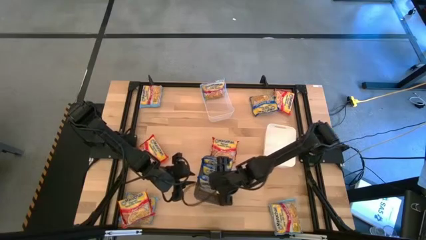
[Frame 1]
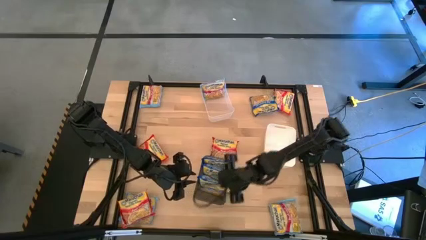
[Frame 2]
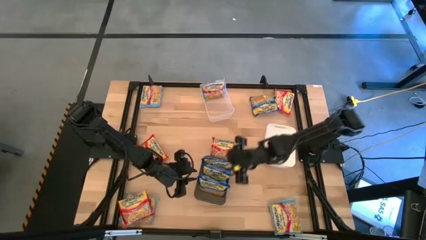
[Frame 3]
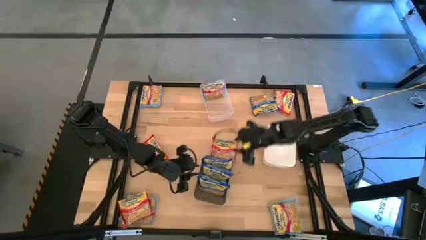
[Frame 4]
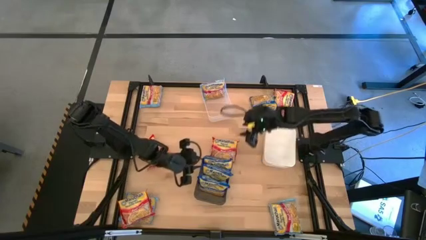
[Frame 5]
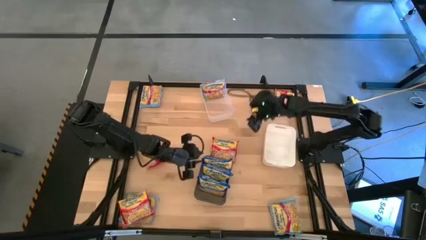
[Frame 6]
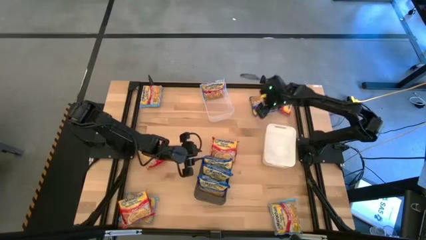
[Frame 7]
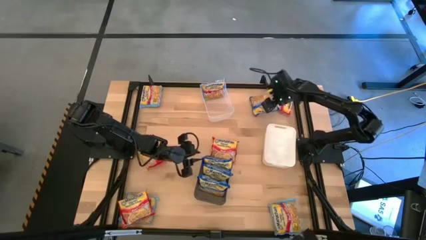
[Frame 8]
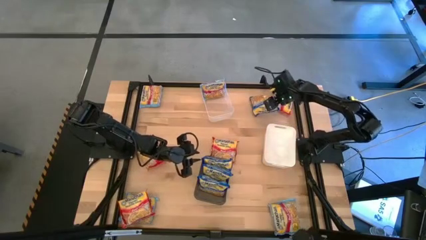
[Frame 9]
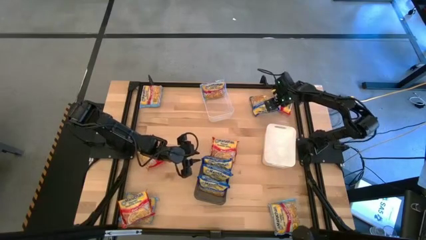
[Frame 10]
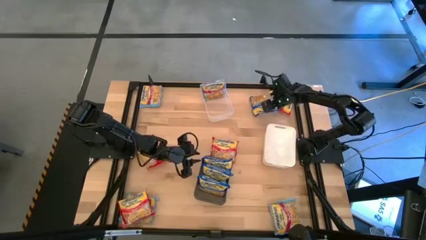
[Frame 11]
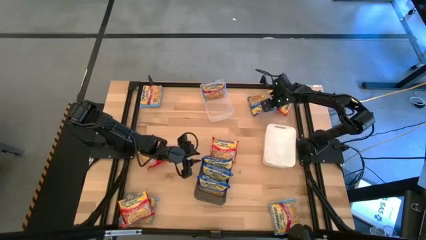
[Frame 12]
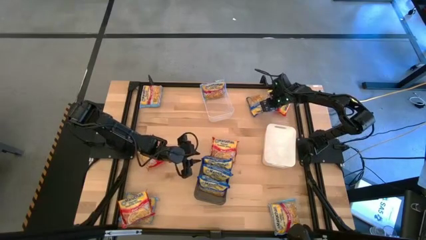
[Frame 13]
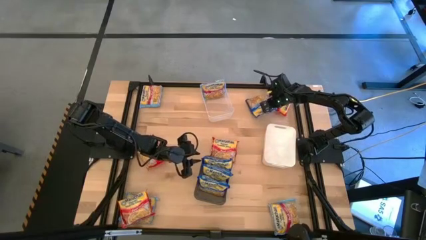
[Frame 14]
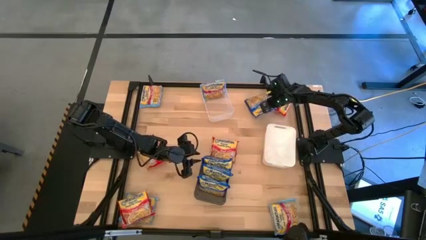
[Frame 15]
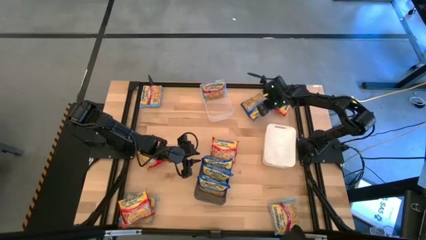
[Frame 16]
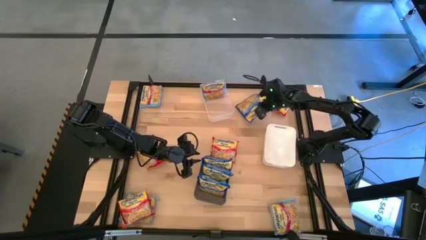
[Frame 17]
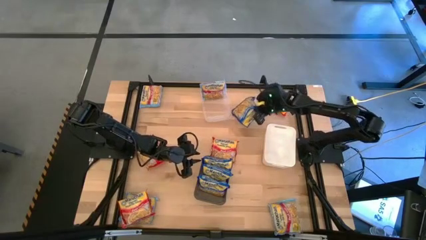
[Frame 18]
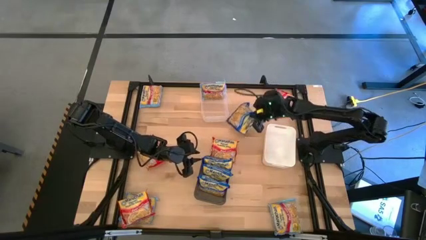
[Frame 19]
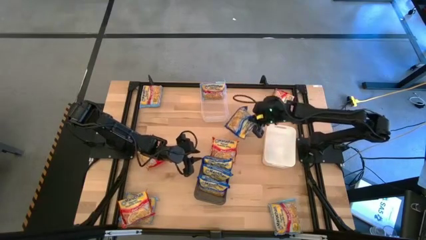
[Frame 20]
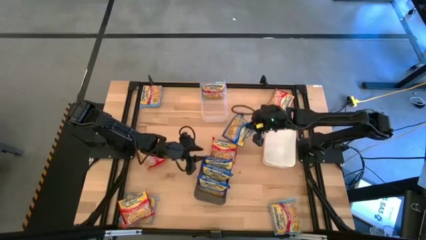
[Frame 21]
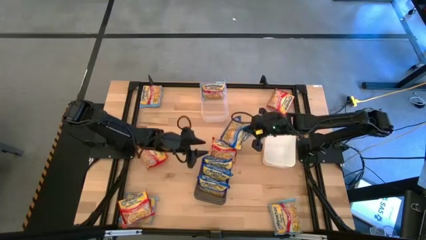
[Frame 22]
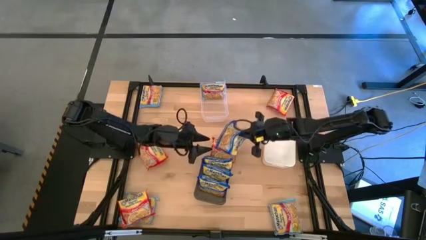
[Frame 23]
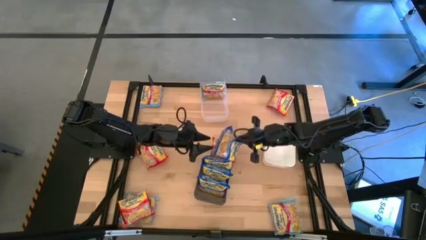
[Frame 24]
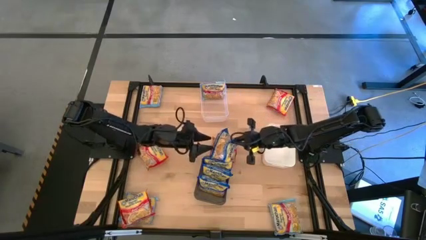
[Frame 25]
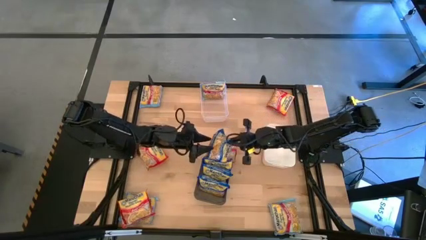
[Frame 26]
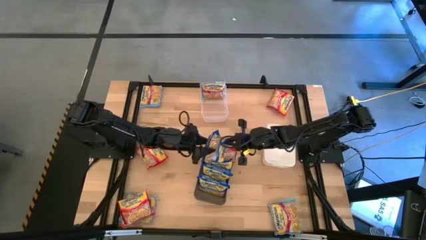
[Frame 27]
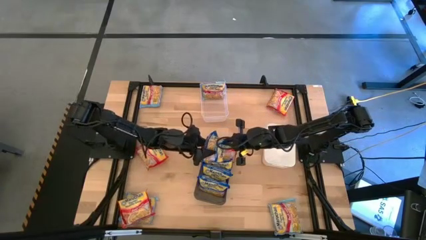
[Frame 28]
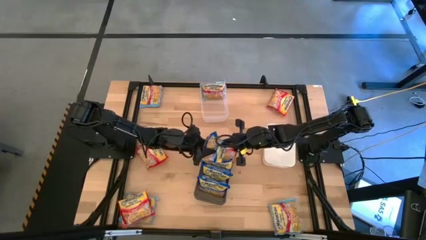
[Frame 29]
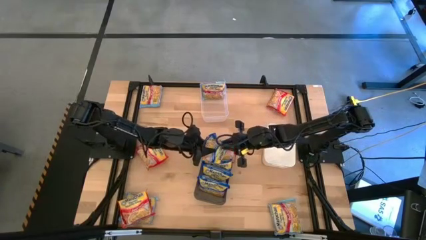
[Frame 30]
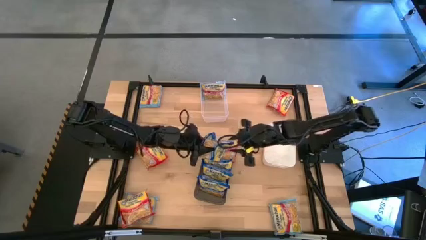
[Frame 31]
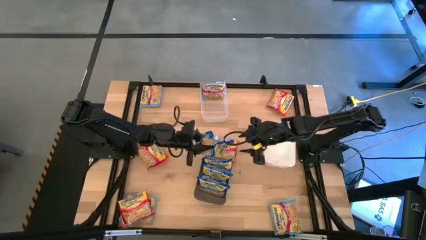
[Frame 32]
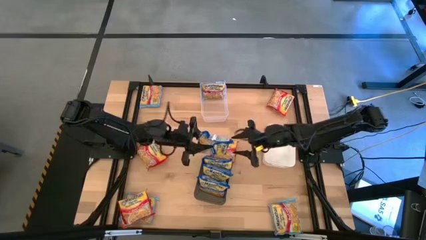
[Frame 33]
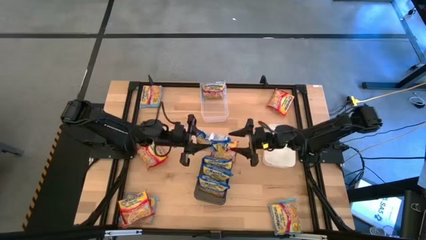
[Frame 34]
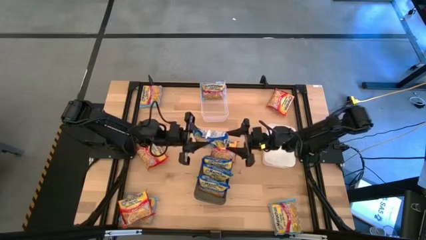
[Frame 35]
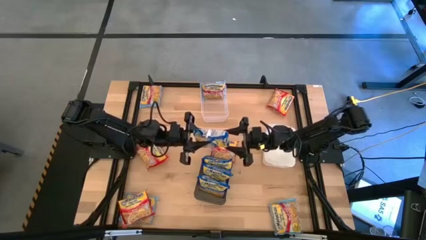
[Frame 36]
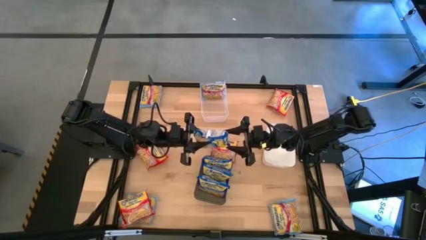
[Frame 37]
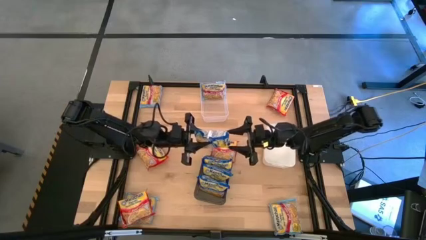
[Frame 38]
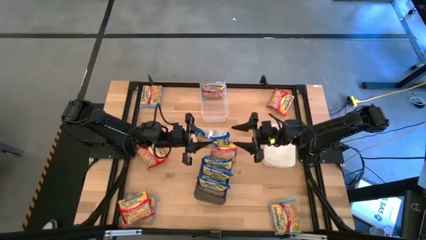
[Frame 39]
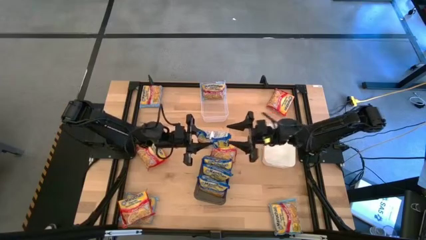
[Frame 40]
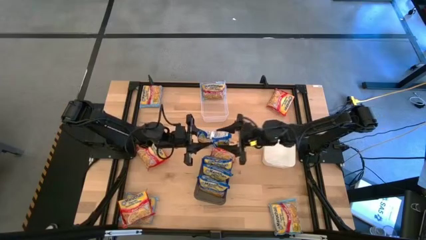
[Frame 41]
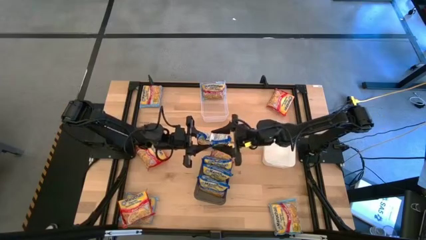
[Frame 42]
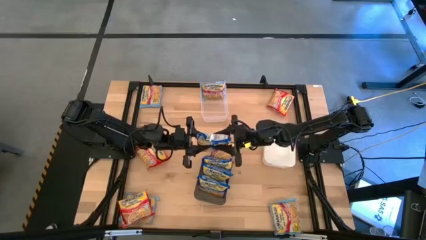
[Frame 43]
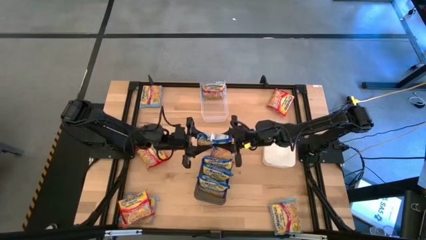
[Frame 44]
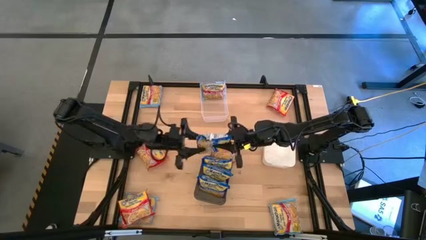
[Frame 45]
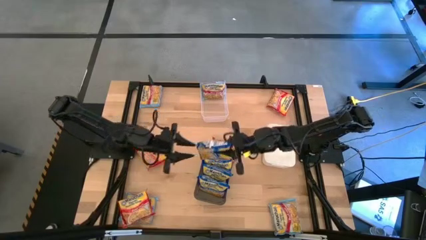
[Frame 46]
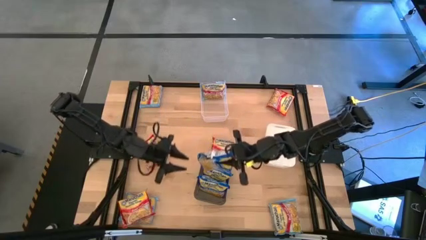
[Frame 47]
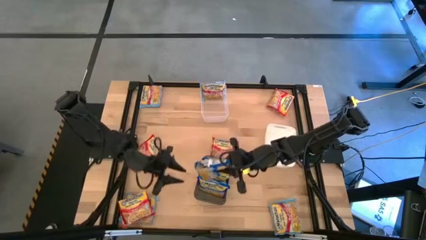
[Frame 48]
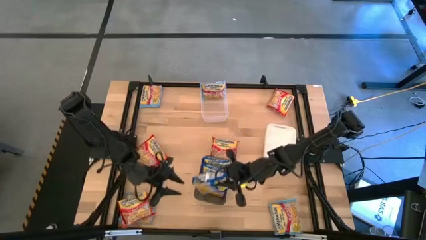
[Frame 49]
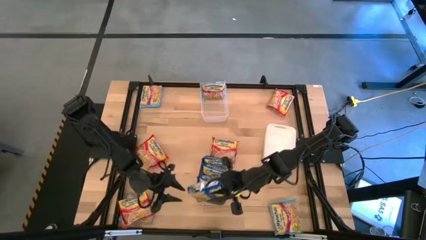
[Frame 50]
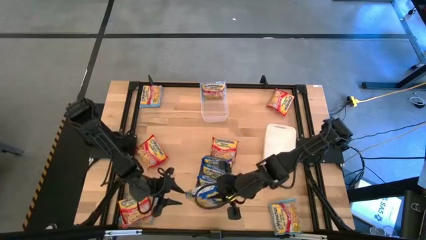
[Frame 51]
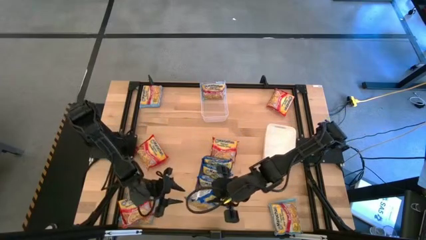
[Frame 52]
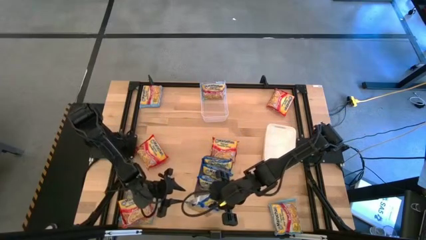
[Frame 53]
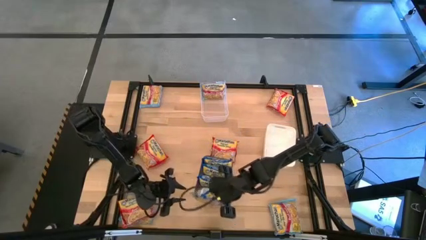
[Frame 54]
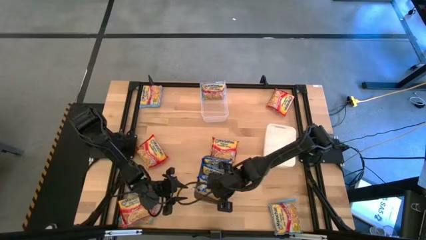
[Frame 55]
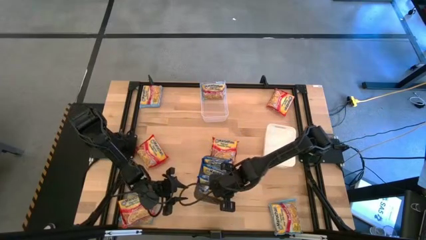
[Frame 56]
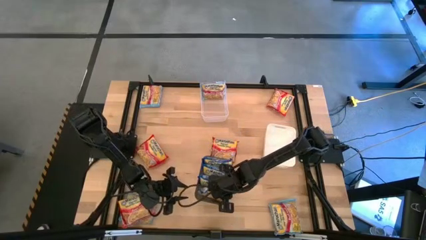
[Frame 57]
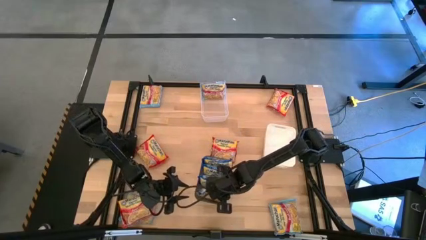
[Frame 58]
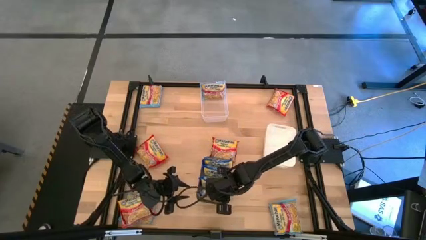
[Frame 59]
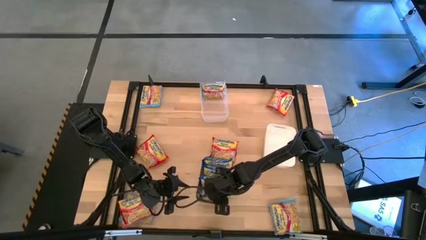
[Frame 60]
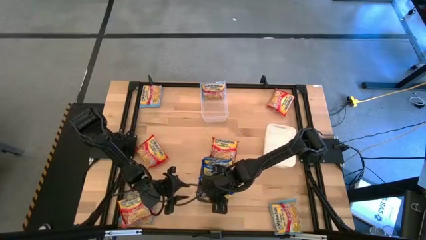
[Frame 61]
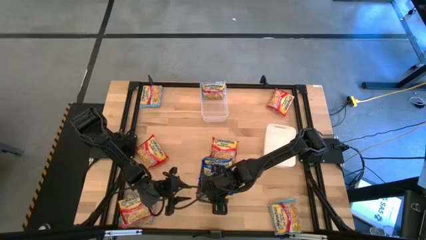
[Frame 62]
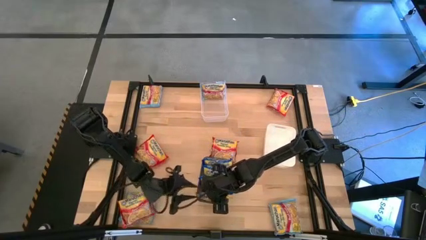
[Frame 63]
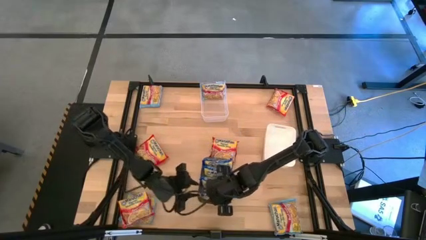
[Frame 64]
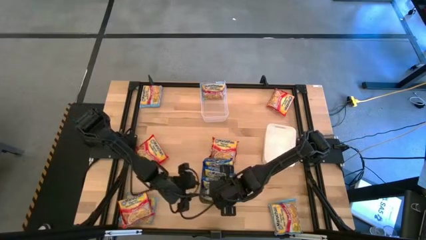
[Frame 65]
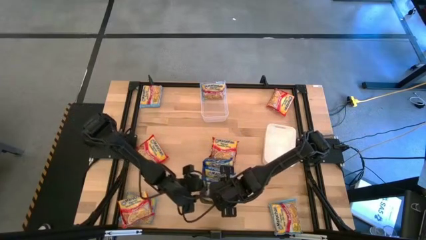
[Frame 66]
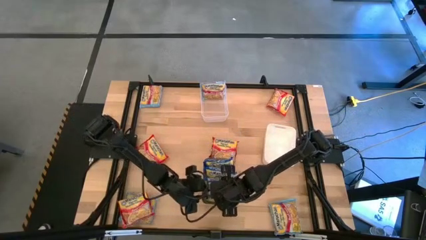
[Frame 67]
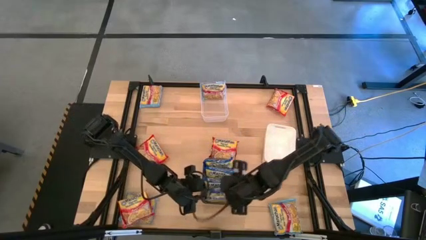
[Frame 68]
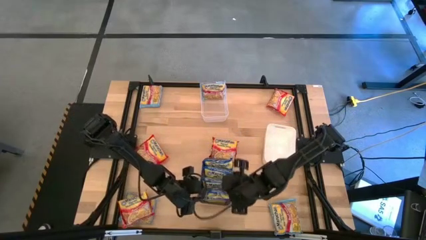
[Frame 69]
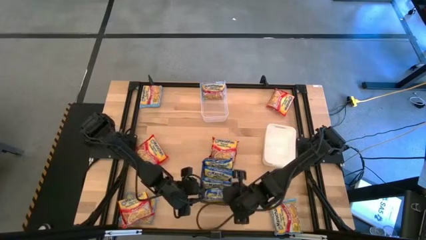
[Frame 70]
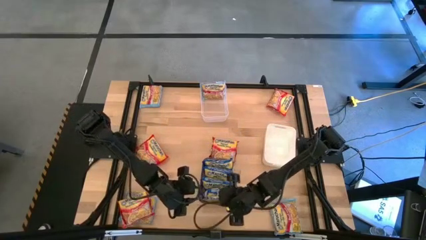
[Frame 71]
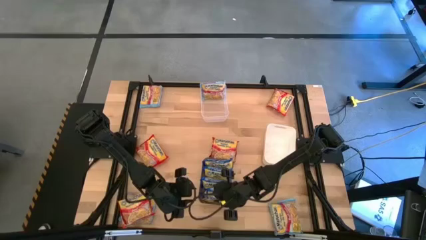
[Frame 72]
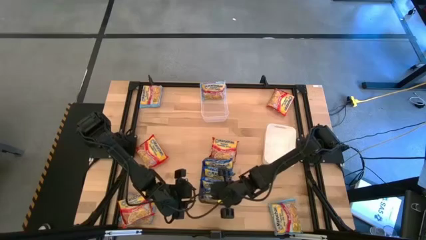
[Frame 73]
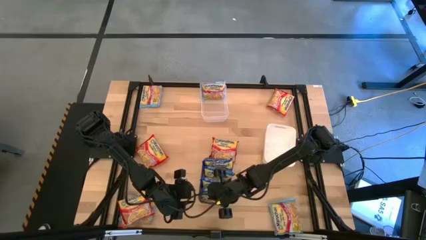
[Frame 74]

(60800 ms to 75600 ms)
Task: Sort Maruchan noodles
Put the blue noodle pack into the black bin
